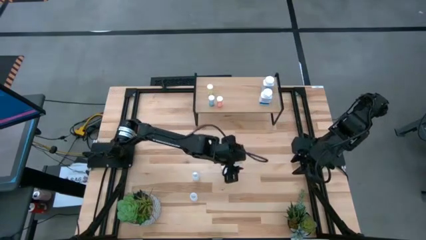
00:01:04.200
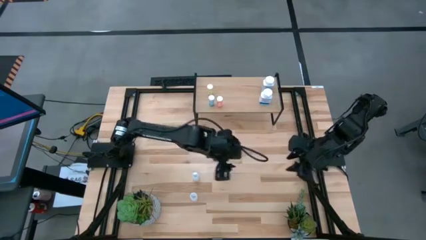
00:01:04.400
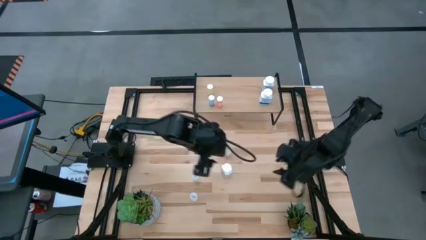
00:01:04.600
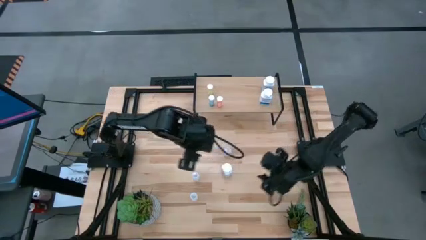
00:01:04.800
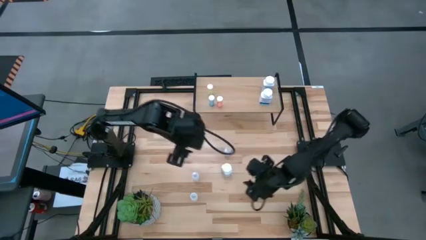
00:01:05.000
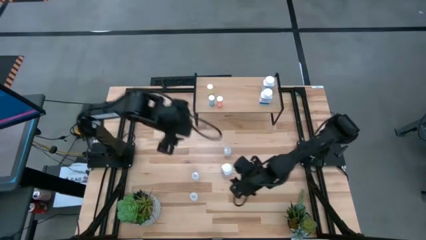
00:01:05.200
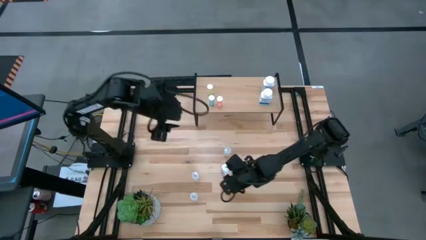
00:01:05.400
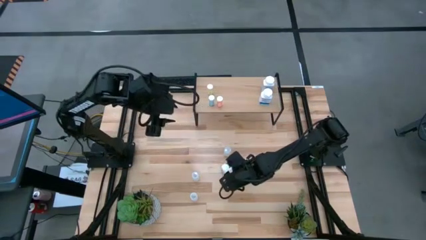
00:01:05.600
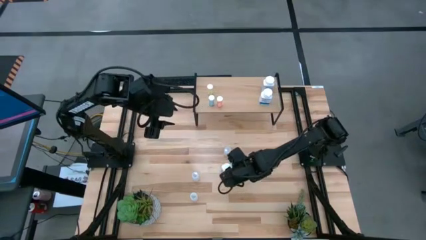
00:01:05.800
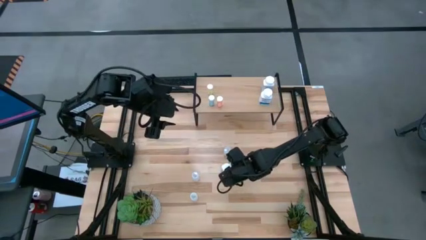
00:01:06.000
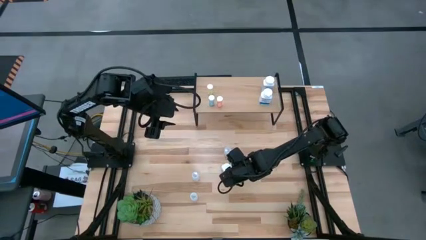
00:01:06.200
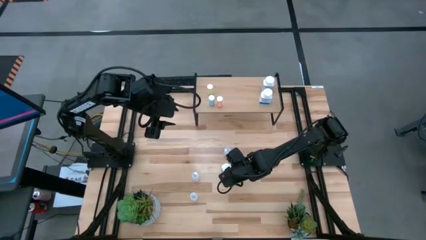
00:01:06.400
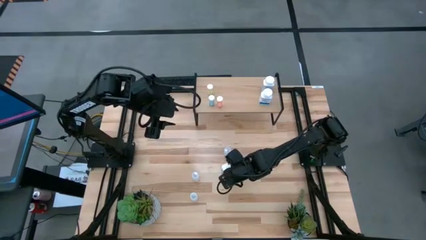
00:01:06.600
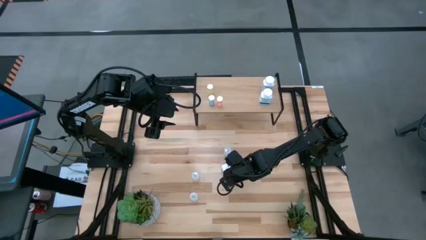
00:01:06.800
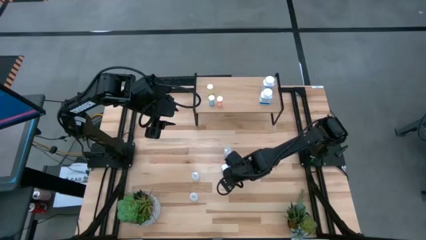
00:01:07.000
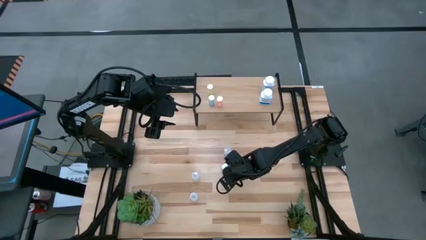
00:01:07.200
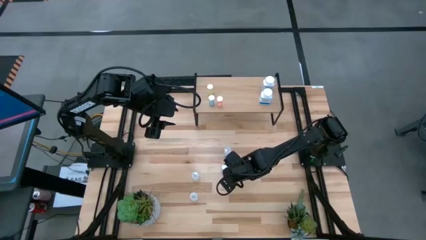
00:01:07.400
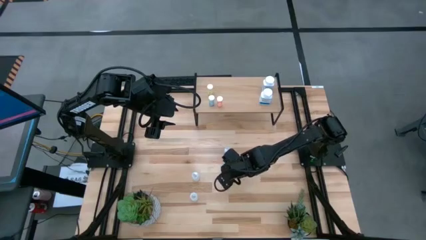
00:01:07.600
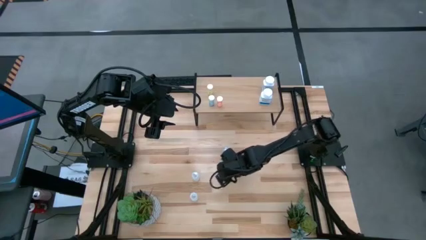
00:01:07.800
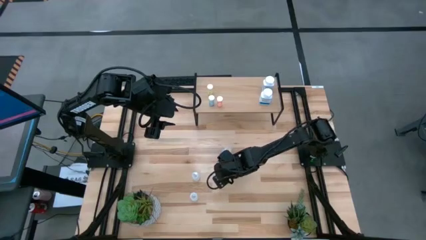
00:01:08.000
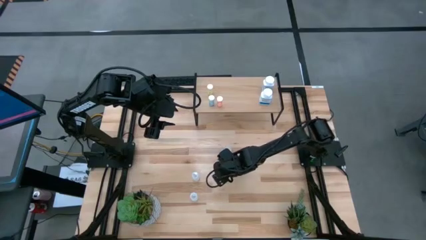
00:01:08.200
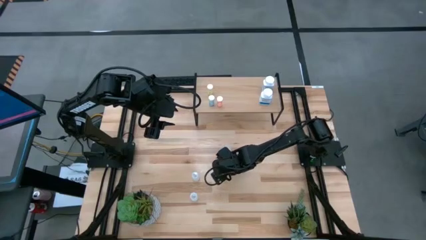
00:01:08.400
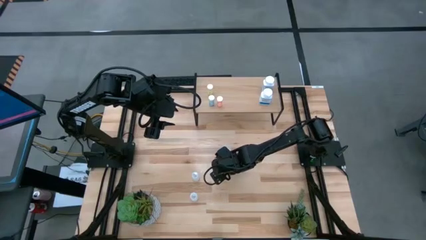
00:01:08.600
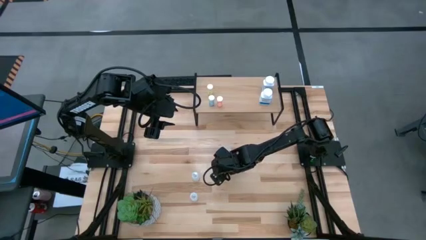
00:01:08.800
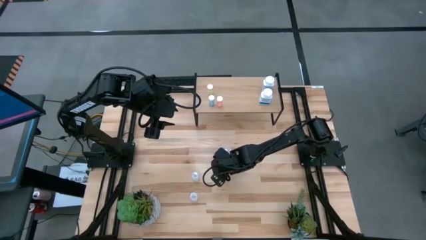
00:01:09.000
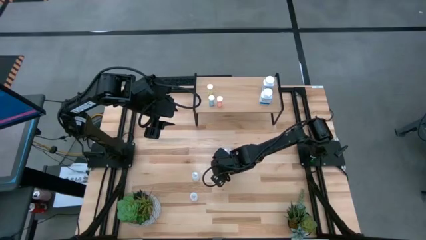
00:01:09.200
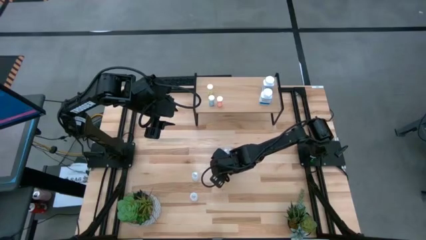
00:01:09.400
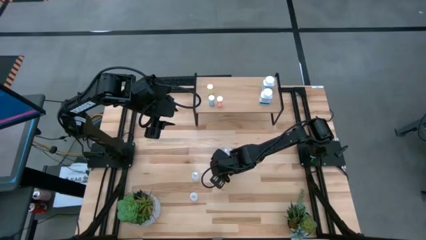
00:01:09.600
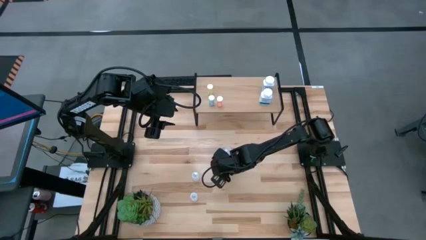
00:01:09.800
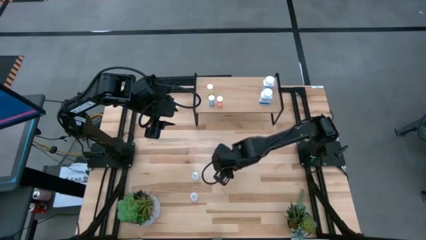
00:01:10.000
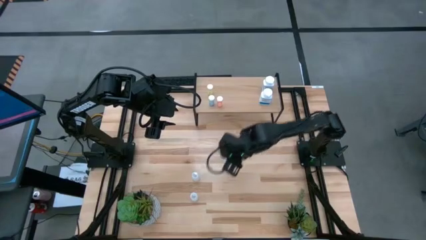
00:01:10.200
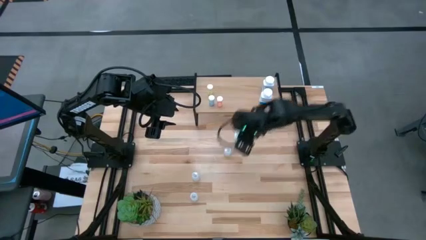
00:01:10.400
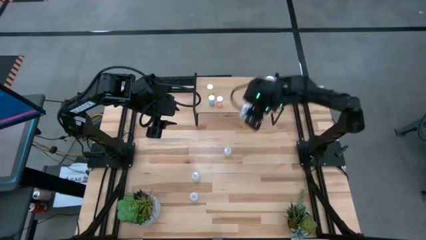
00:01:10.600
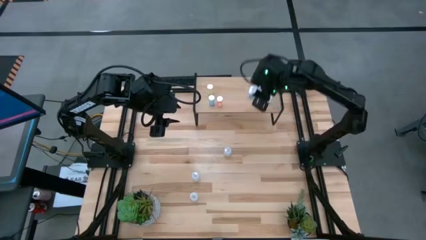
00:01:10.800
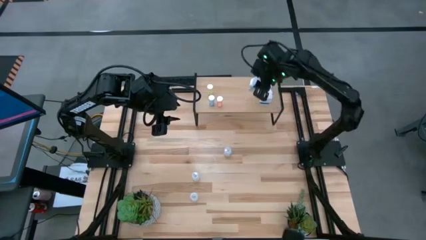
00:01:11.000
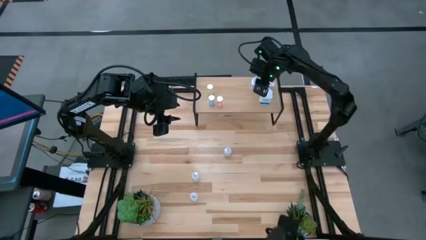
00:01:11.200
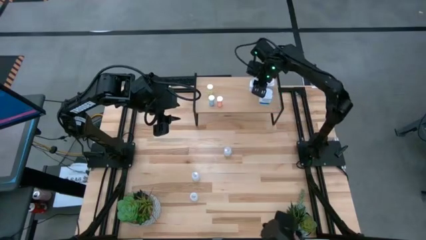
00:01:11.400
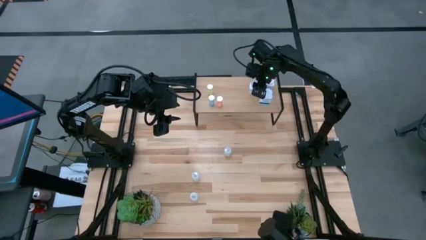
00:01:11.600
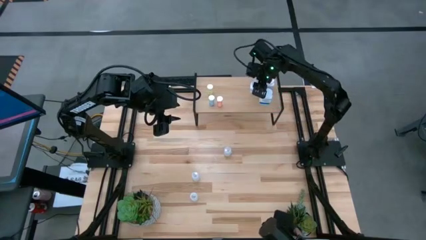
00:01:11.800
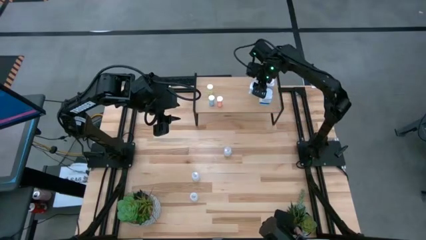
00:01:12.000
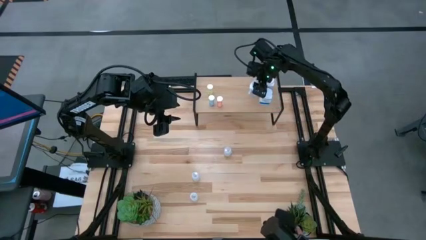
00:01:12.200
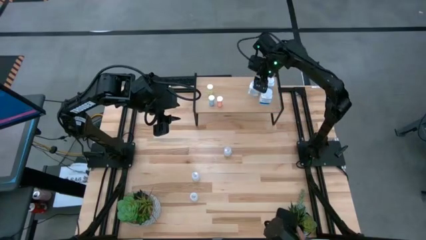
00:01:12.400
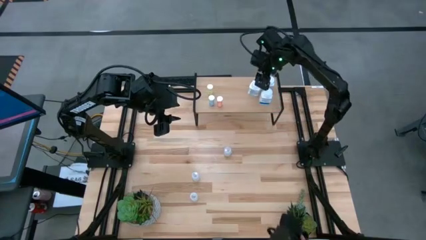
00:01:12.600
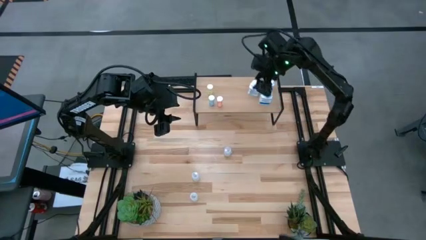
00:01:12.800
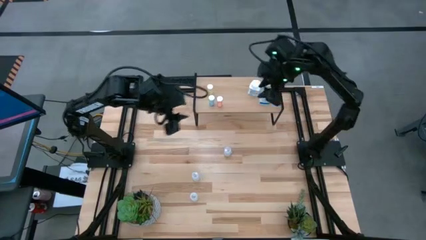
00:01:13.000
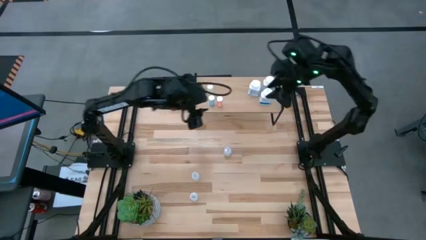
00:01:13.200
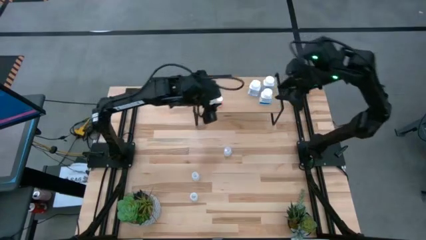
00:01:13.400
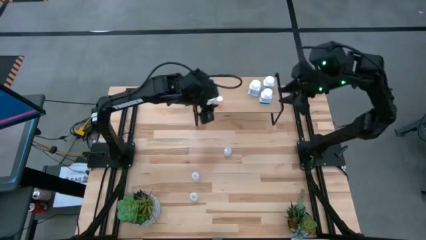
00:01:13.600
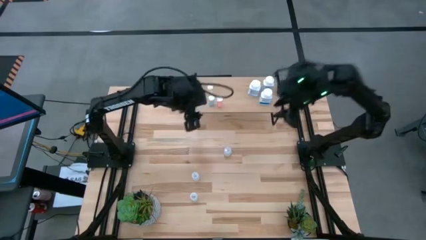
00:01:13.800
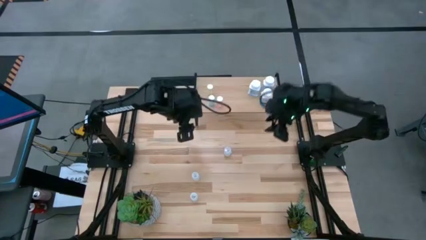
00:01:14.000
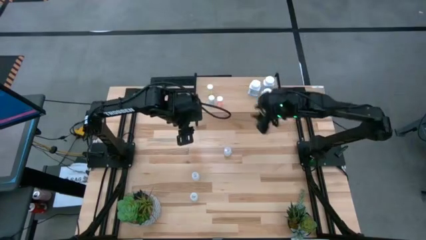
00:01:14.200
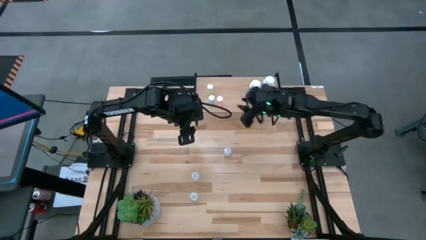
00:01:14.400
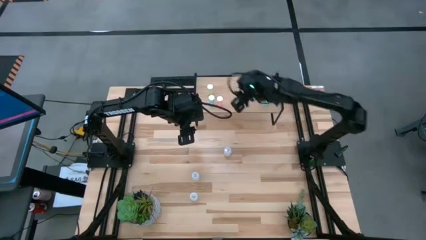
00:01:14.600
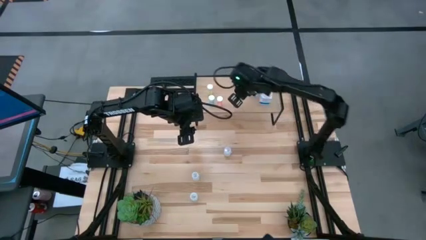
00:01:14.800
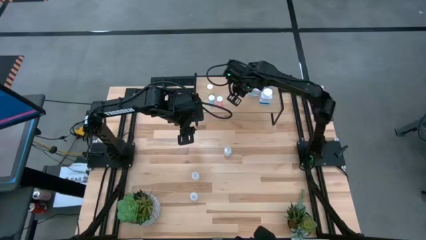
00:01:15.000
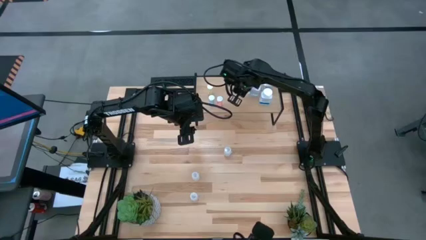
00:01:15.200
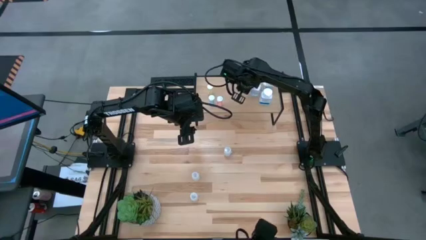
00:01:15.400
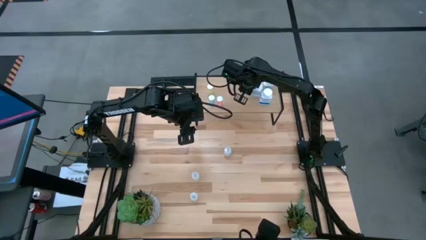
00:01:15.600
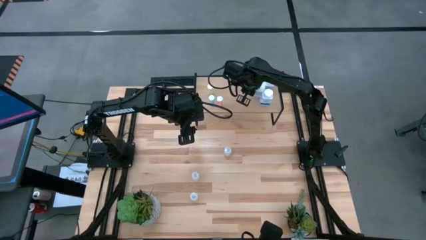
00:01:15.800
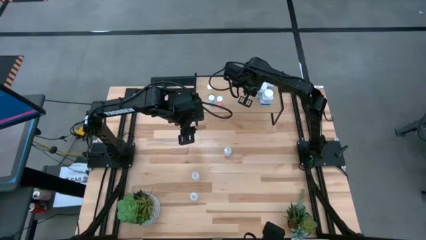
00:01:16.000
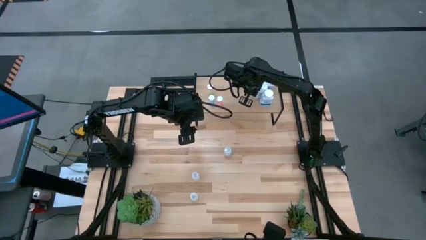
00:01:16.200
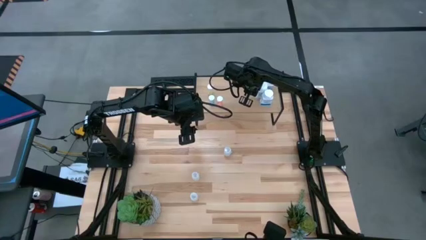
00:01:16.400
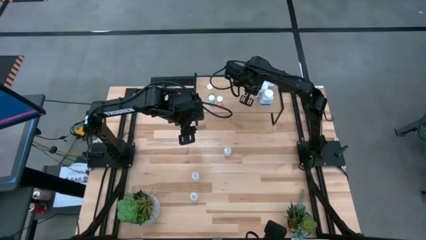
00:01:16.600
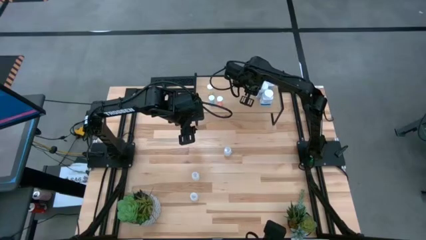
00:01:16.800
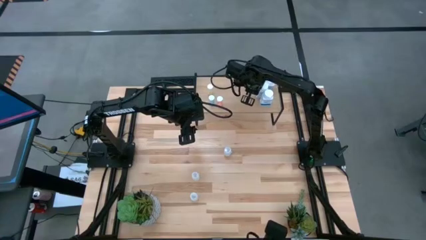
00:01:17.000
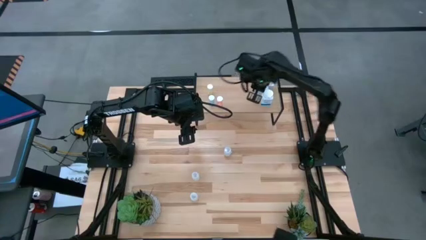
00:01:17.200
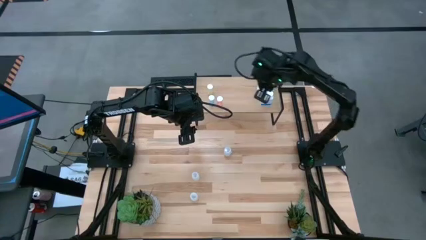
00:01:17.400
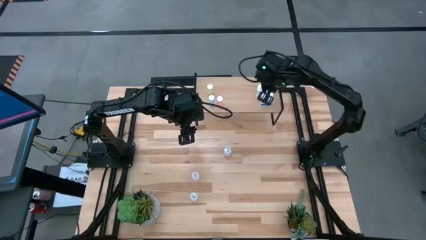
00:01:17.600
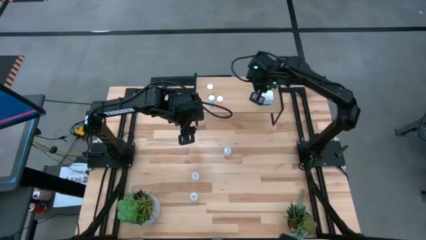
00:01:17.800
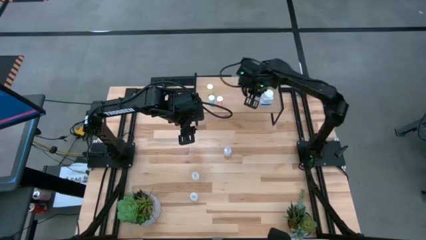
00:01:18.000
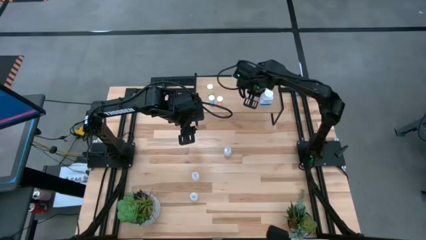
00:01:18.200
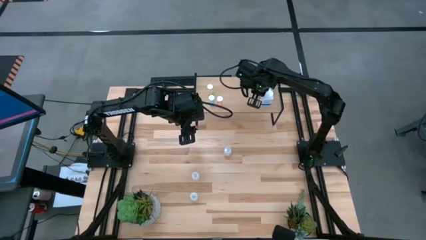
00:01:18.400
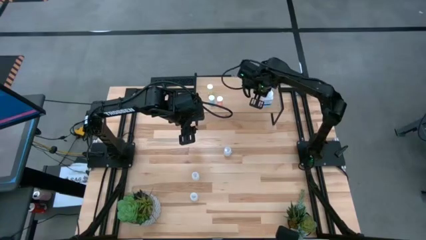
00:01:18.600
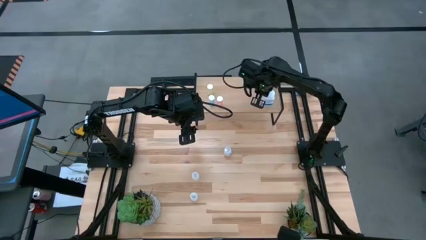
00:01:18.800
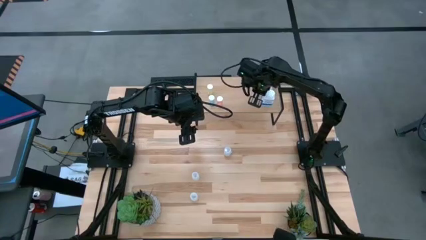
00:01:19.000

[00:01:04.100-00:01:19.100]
Task: Pick and place medicine bottles onto shelf by color
Align the white pill bottle with the other white pill bottles on the shelf

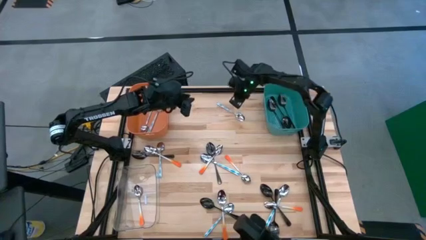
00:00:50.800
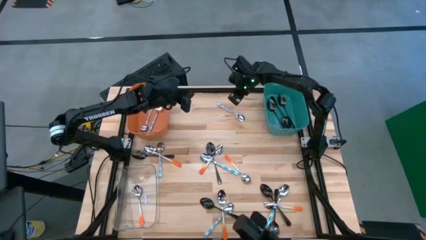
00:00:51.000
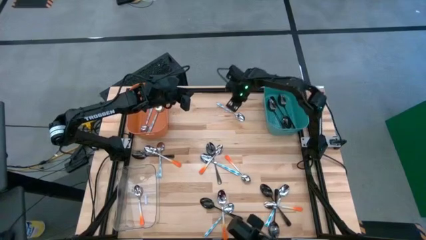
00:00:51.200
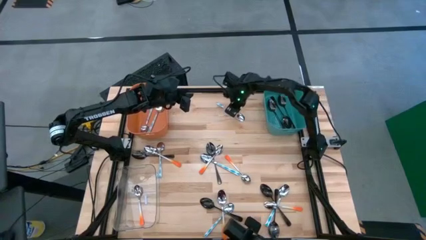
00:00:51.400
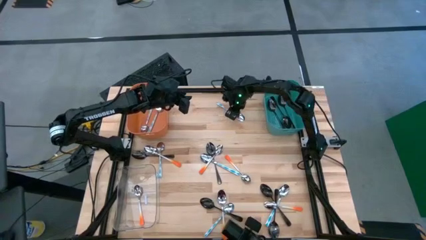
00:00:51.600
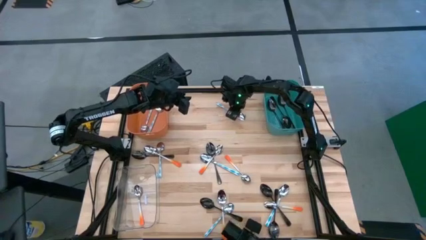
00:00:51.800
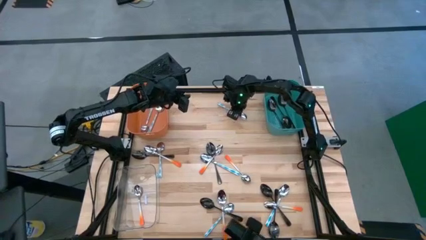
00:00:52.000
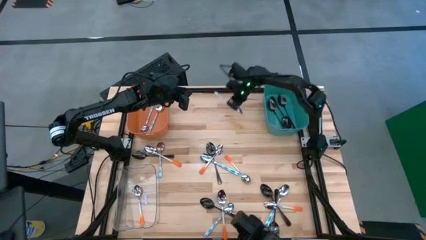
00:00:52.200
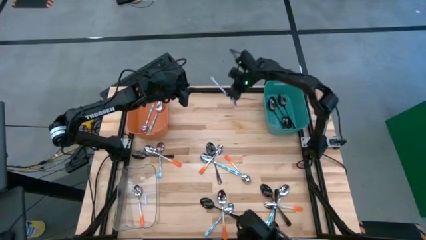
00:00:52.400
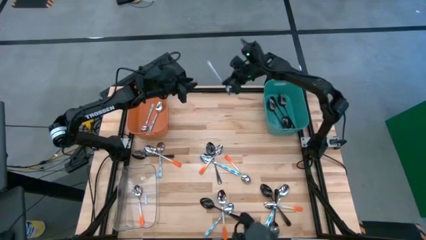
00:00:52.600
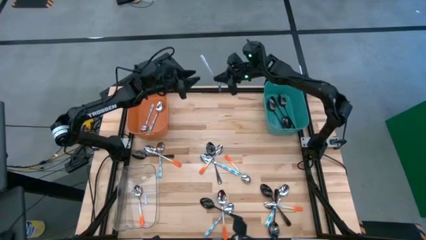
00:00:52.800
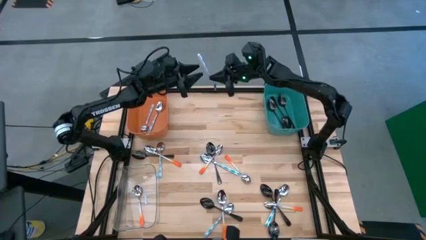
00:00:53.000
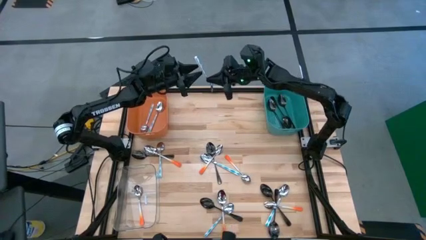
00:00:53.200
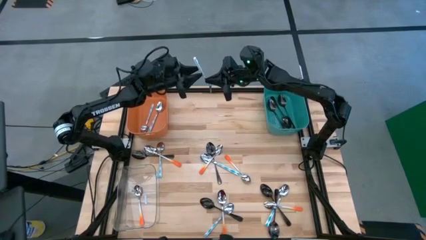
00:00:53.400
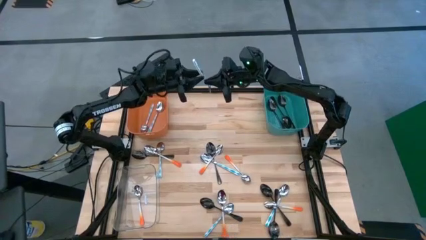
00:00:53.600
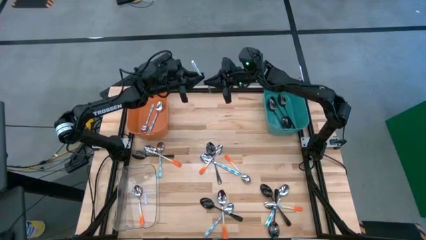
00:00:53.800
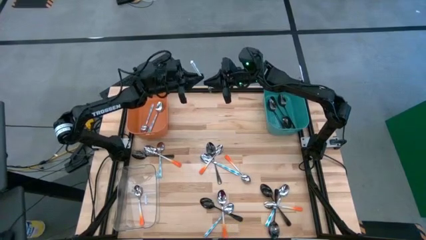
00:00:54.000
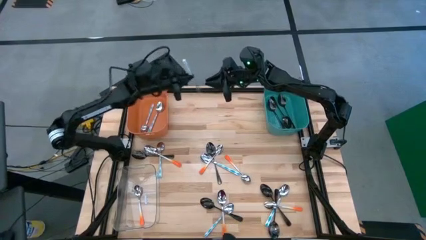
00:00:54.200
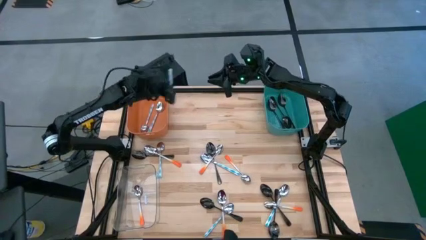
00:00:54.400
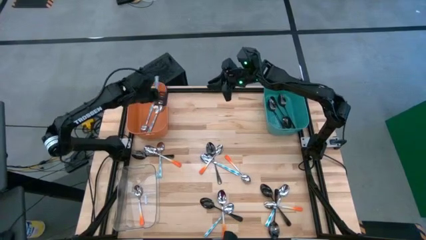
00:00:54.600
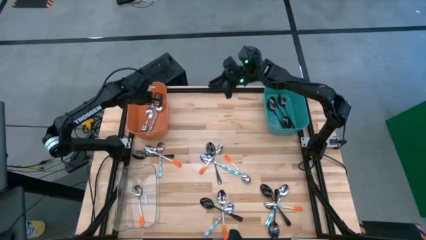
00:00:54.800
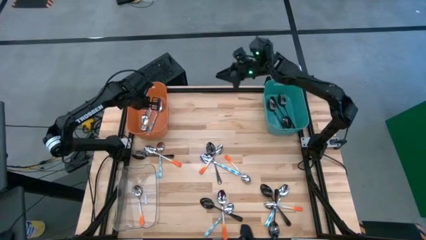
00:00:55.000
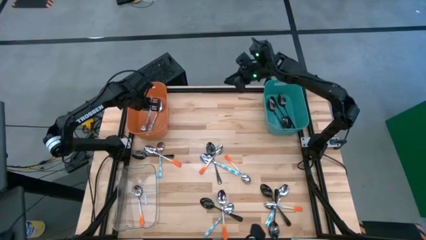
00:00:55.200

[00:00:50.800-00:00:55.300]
Task: Sort silverware by color (type)
Put the white blue spoon into the orange bin
